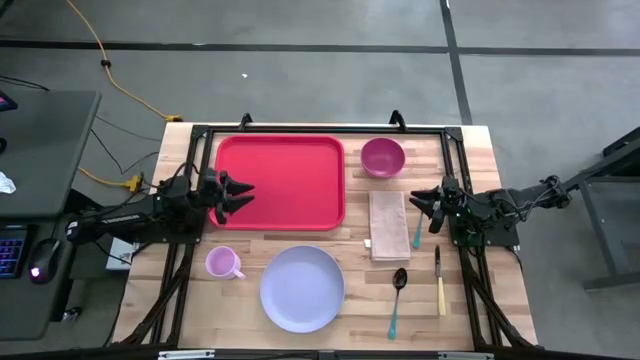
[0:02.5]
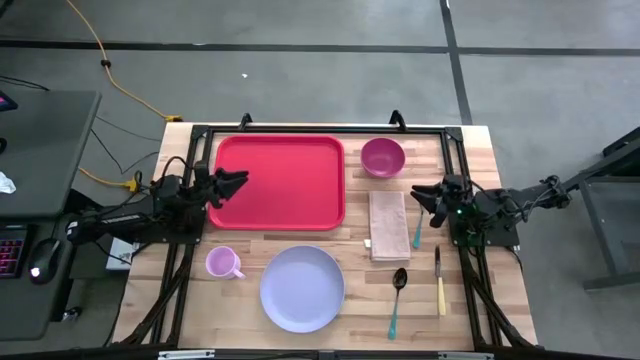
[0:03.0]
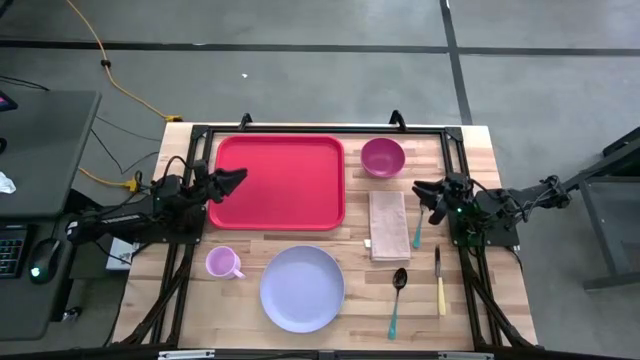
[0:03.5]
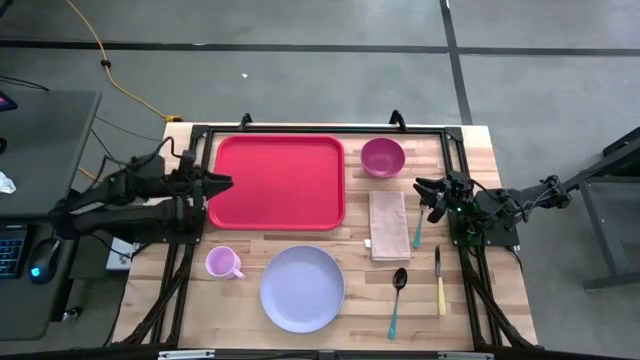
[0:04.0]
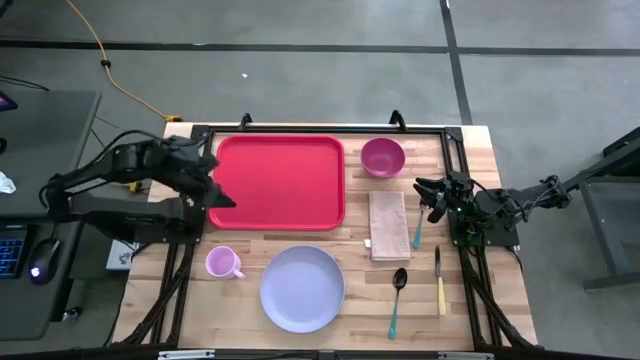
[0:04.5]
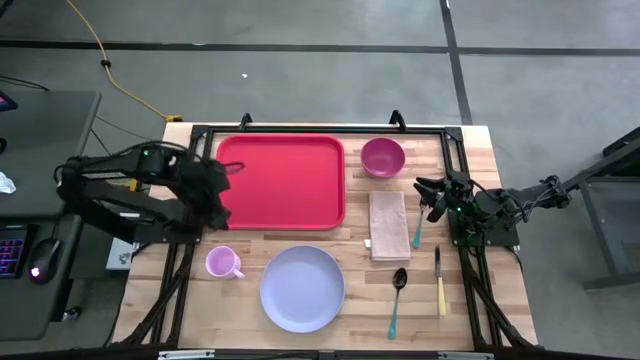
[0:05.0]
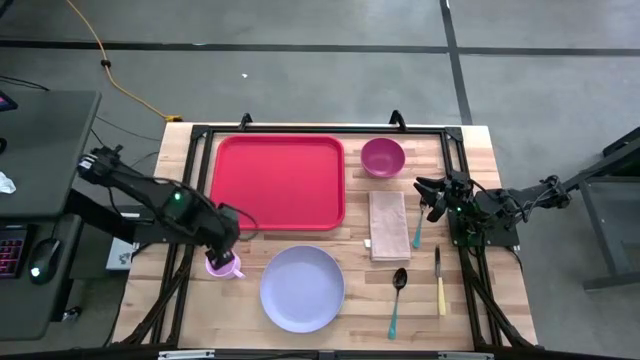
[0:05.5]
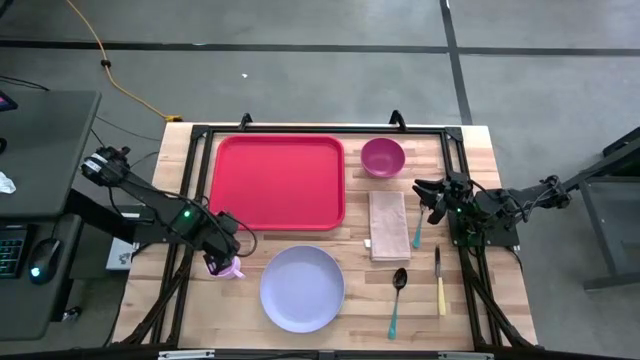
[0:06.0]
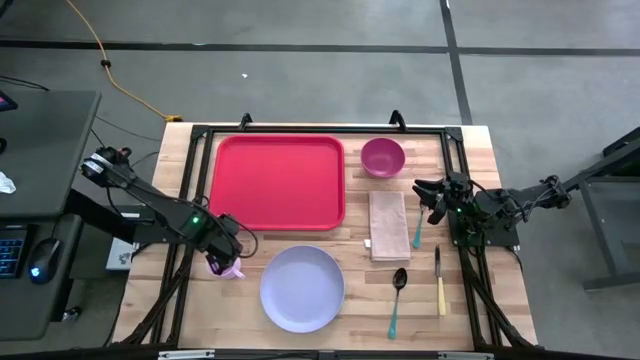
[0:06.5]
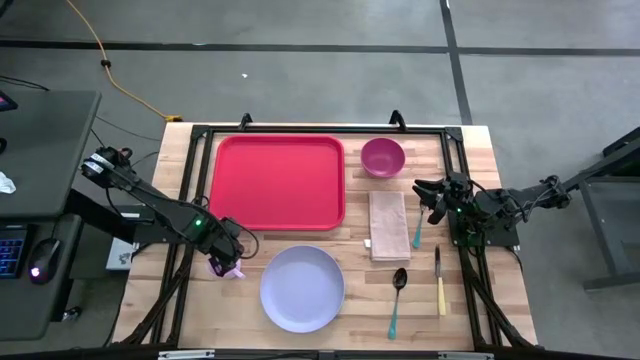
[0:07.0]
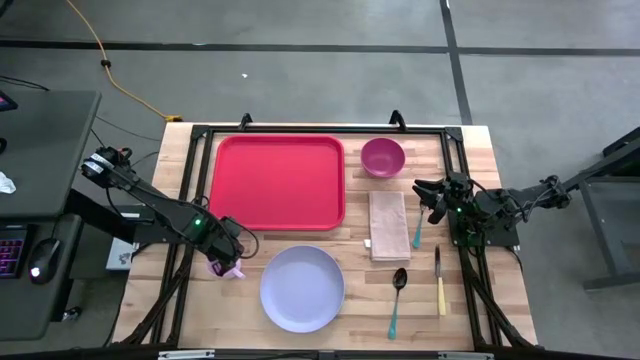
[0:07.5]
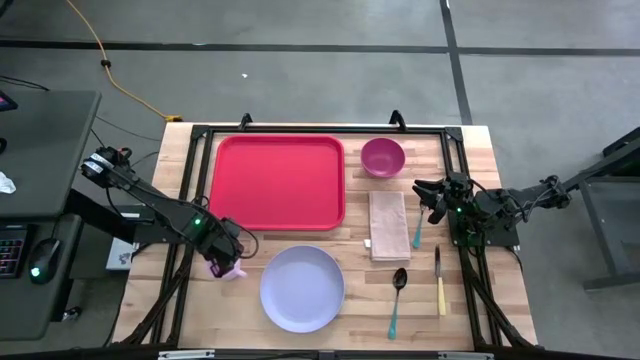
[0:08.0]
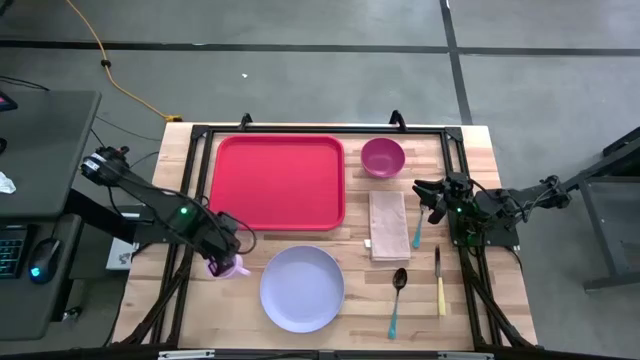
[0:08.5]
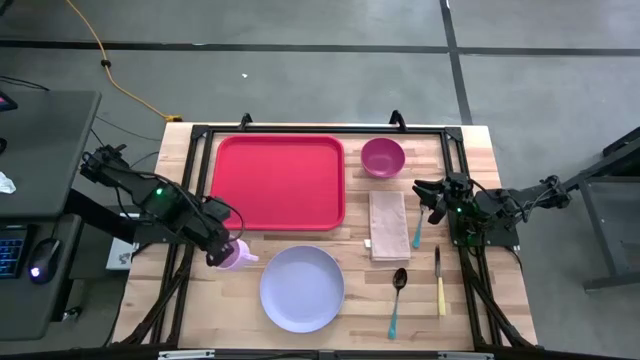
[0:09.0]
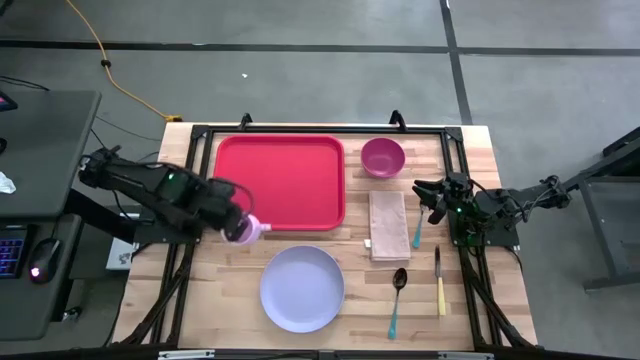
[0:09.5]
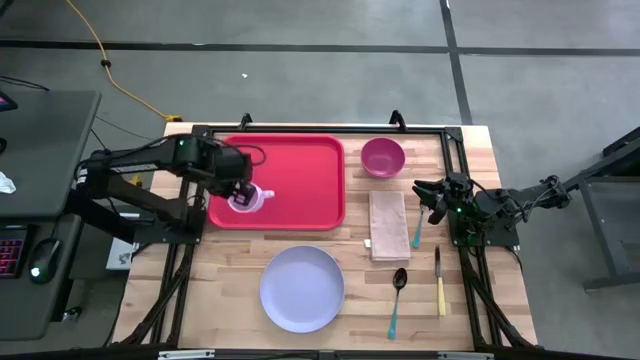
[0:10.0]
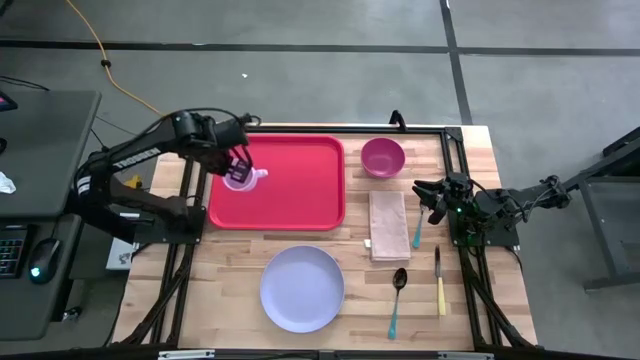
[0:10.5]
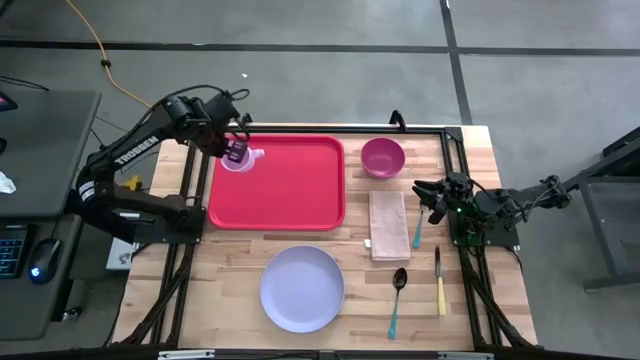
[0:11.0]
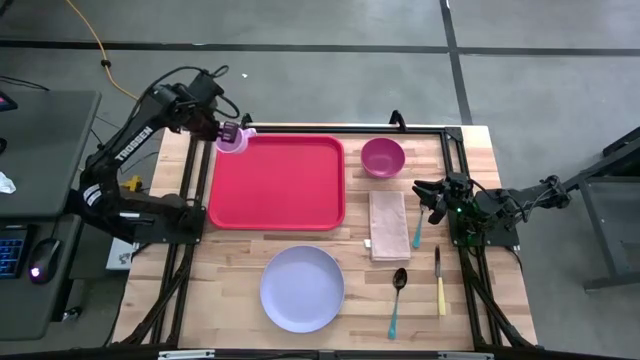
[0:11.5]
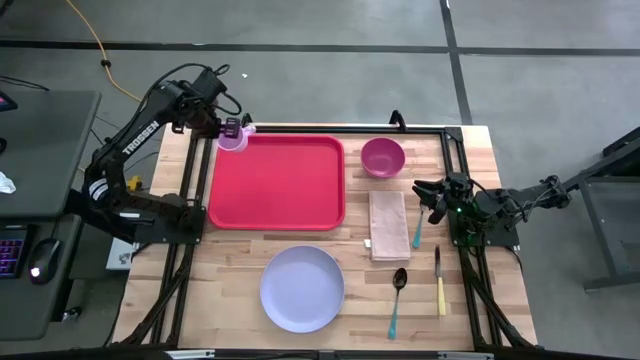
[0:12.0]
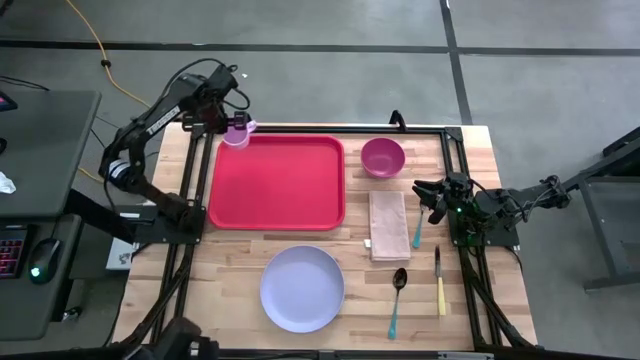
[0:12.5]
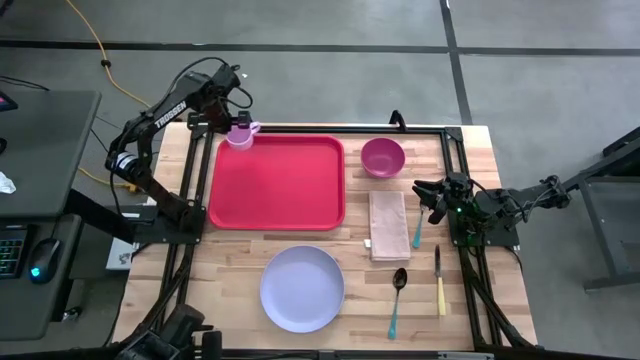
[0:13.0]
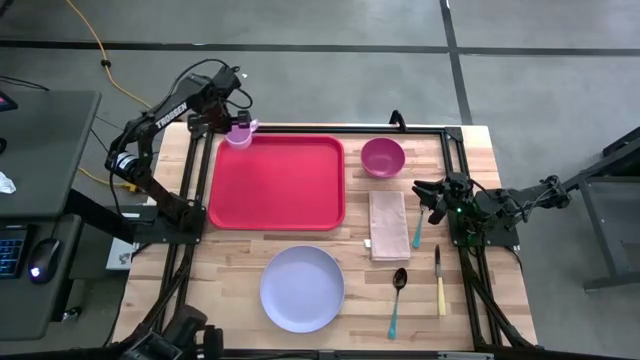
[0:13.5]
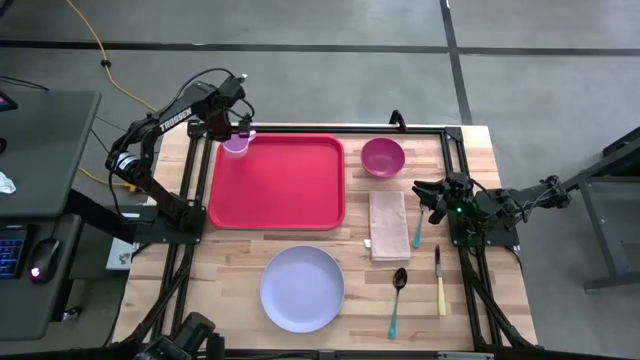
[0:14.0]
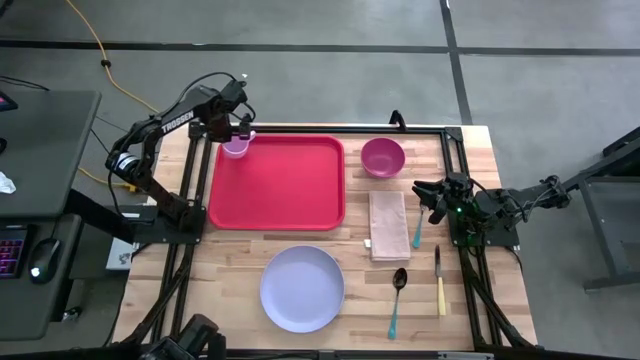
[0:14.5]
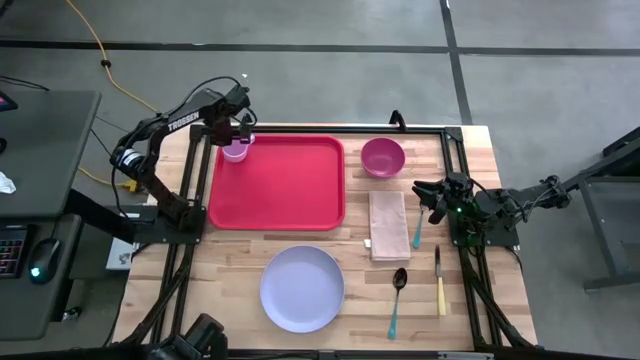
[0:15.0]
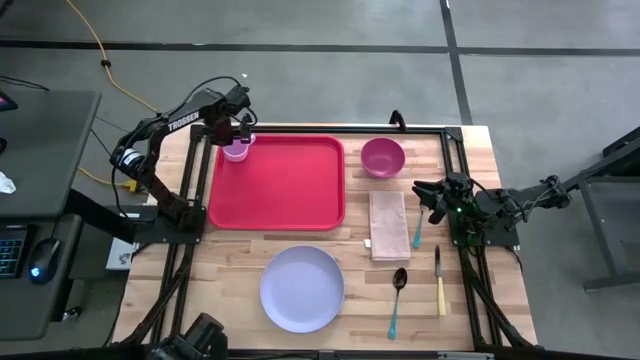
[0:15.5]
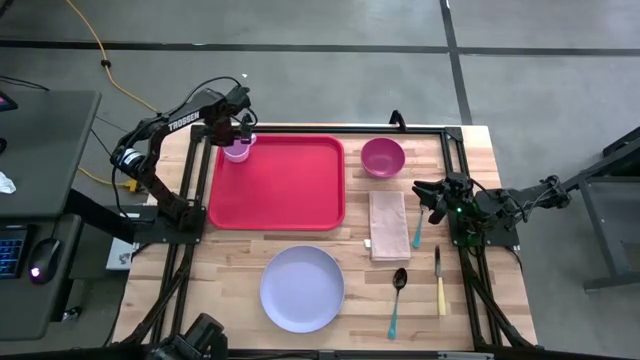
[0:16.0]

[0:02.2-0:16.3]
Task: Set up tray
Put the pink mug on the orange tray

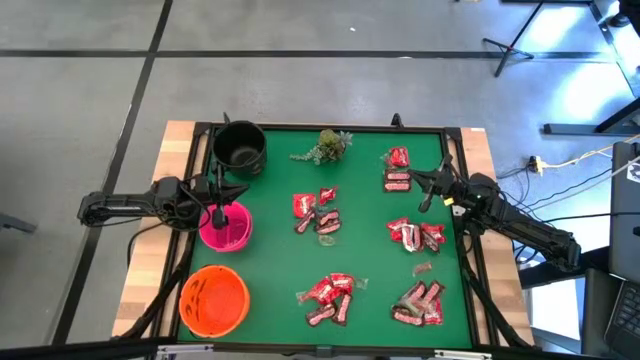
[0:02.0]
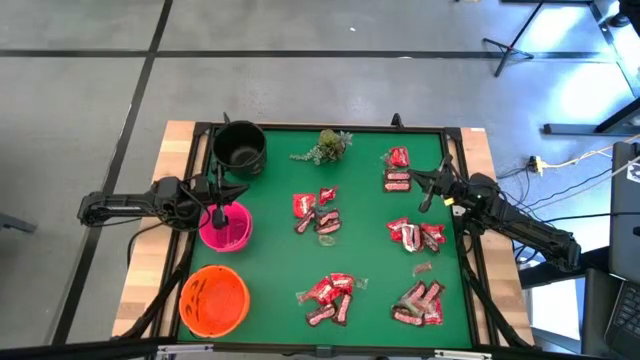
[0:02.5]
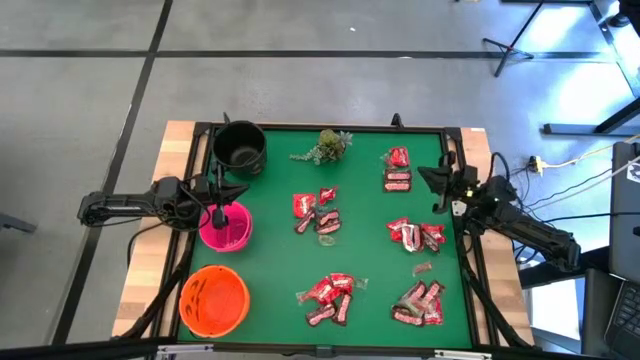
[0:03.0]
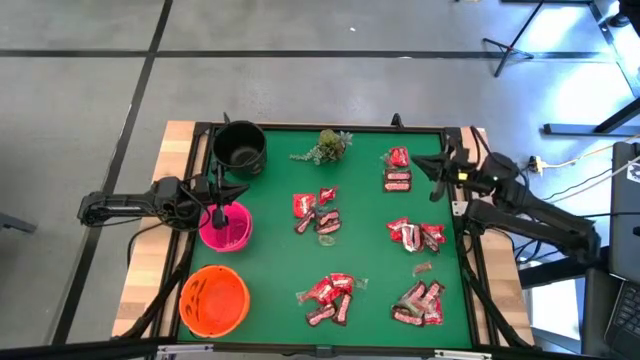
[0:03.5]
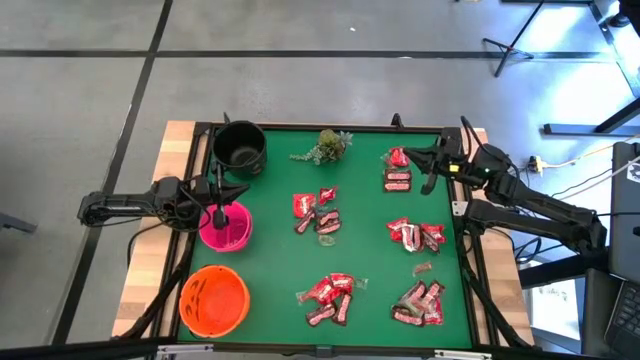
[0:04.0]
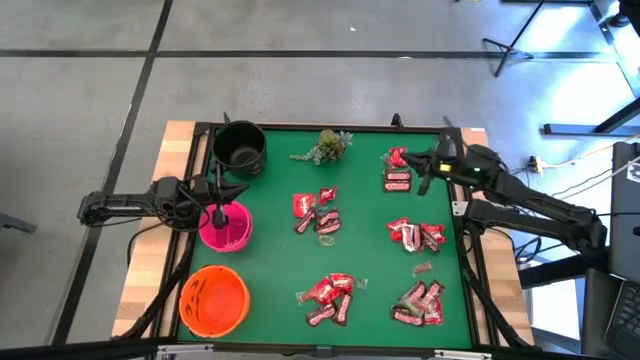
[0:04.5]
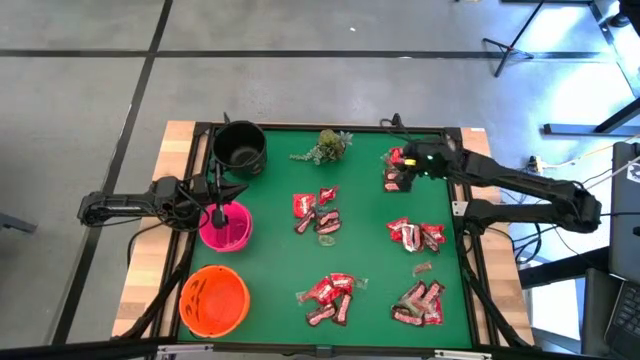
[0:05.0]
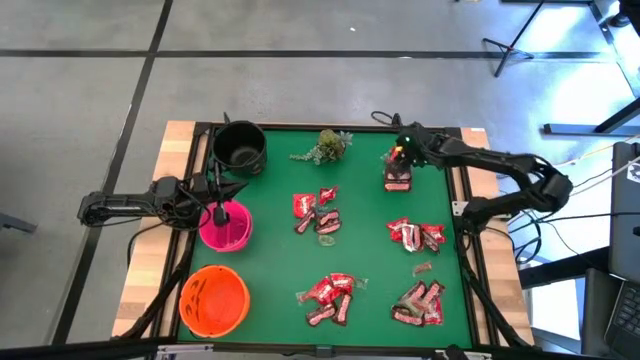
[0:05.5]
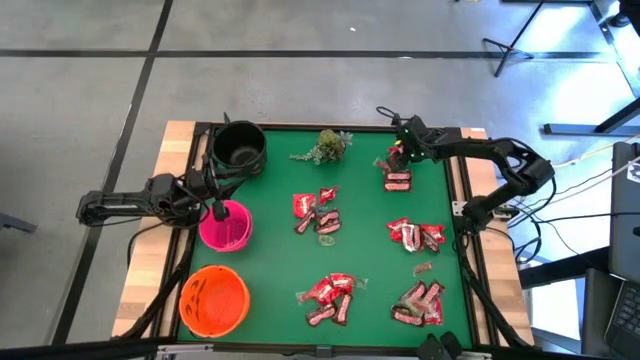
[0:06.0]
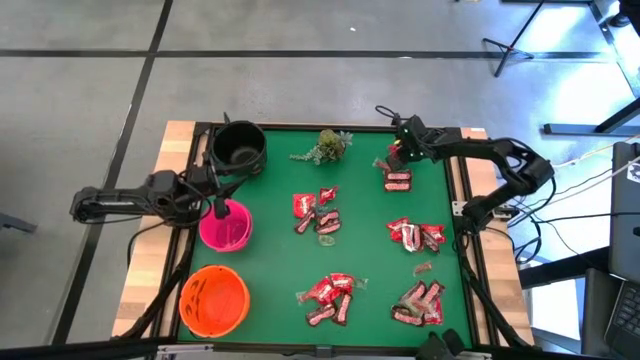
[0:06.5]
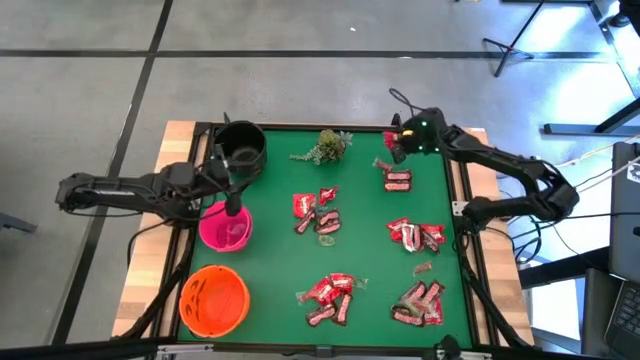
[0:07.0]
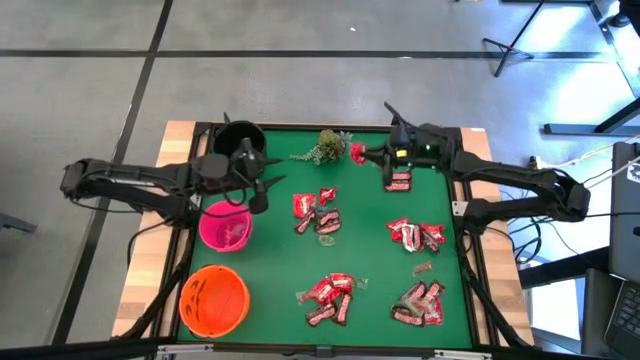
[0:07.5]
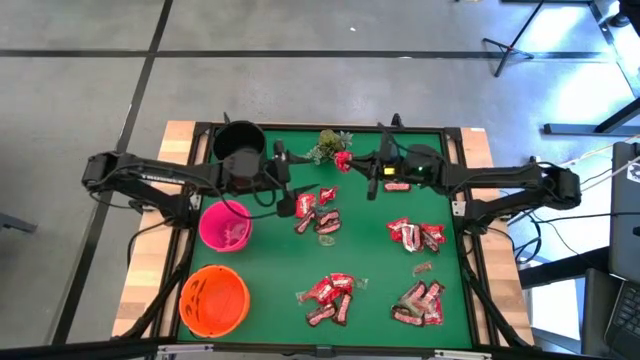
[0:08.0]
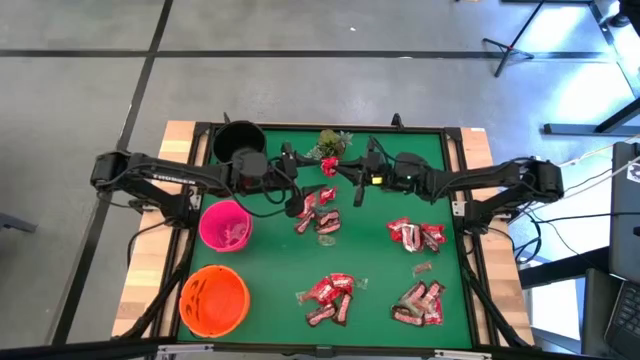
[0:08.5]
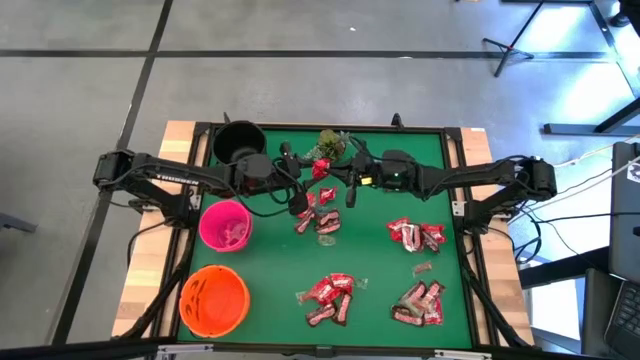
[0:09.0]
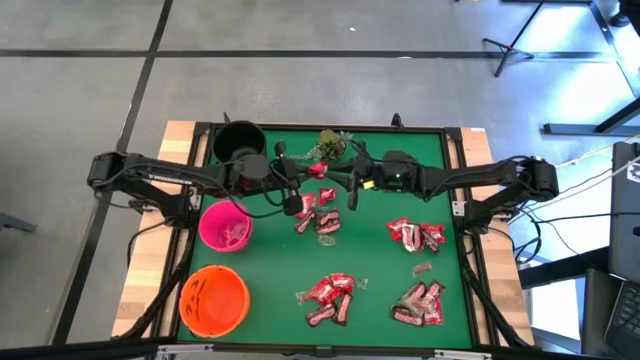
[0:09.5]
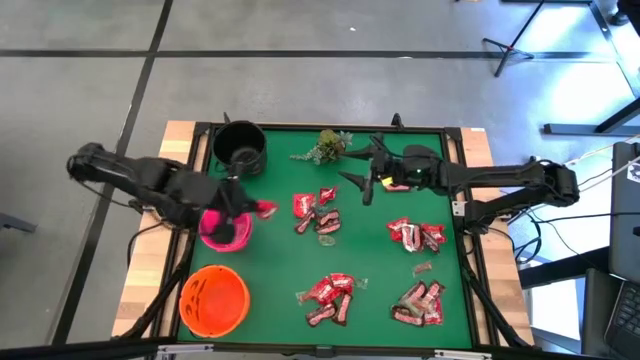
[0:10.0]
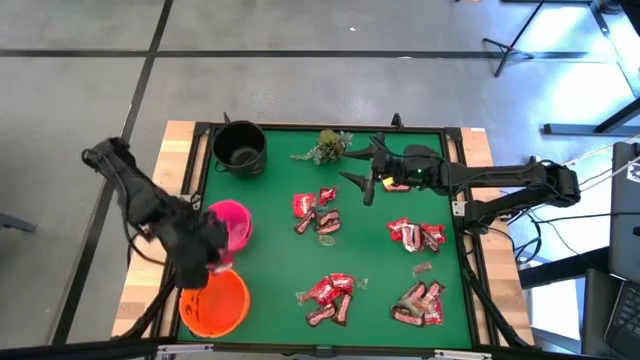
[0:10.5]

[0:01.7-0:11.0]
Task: Sort candy
Put the red candy into the orange bucket
